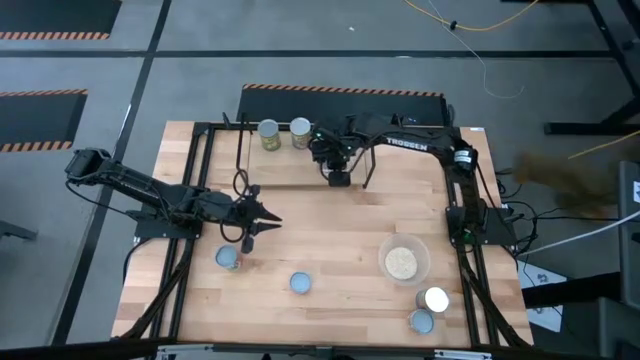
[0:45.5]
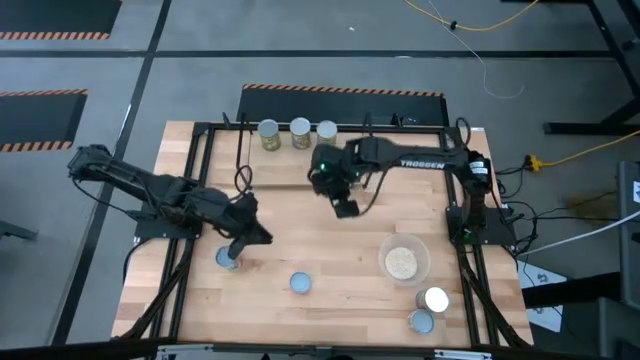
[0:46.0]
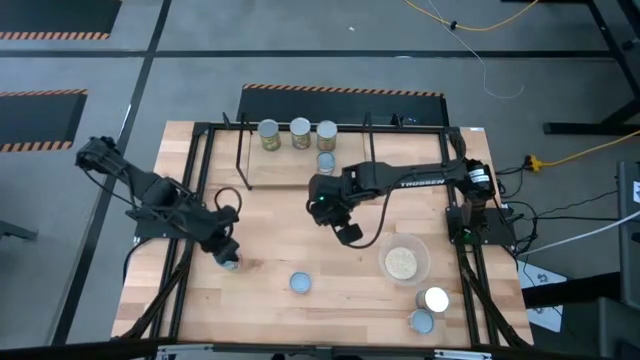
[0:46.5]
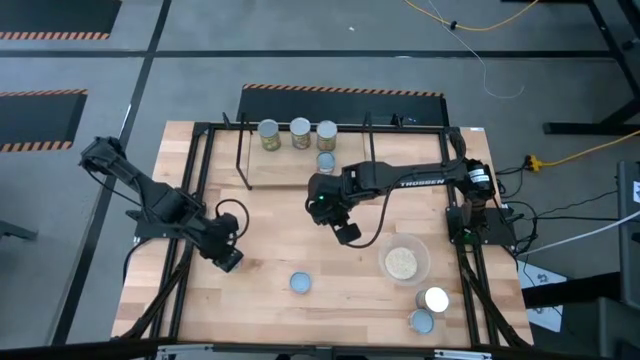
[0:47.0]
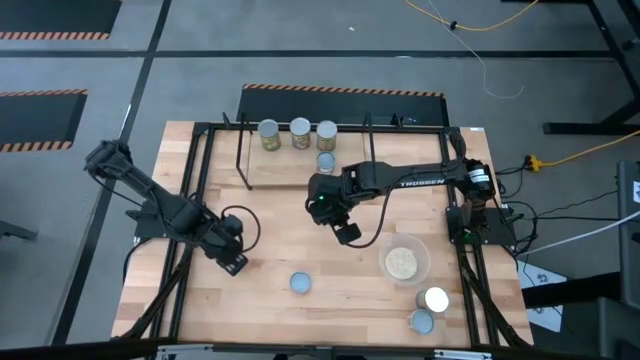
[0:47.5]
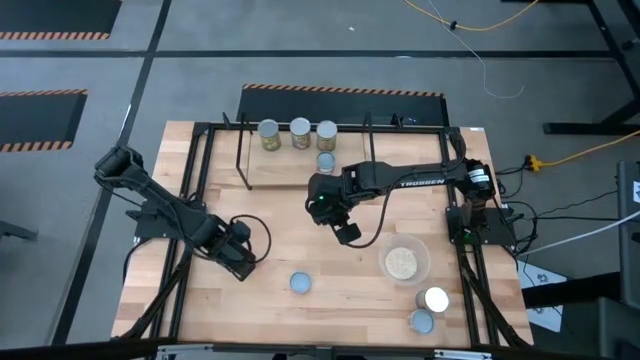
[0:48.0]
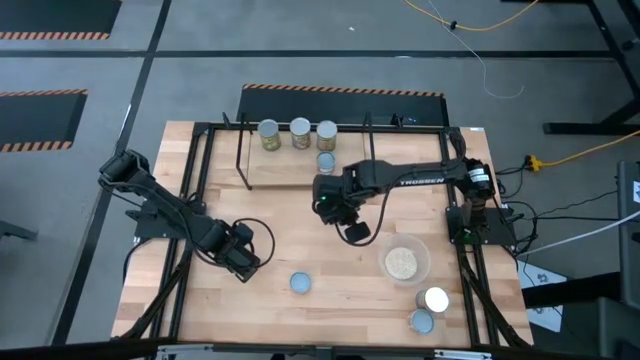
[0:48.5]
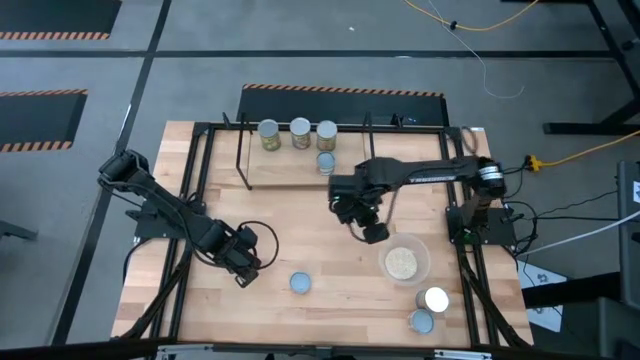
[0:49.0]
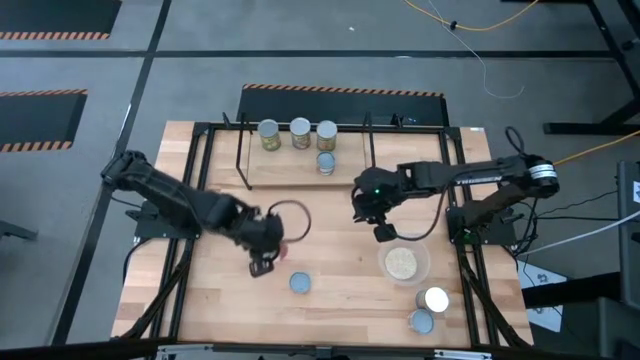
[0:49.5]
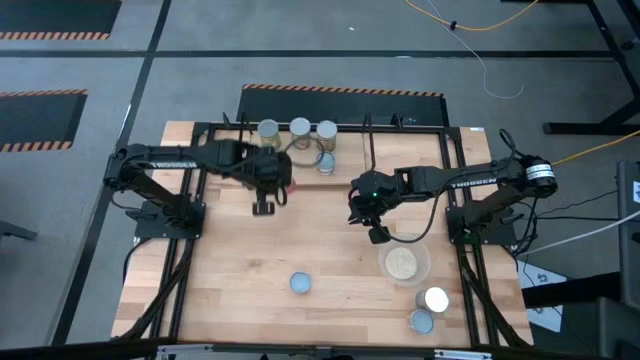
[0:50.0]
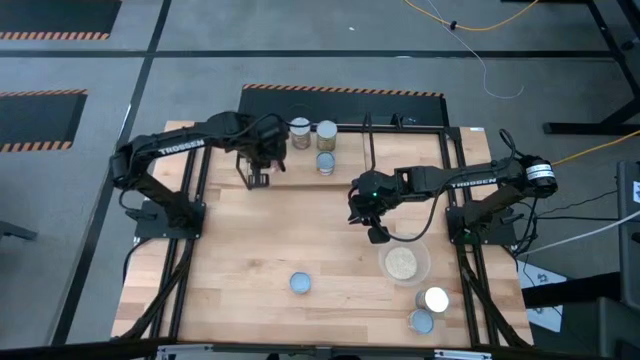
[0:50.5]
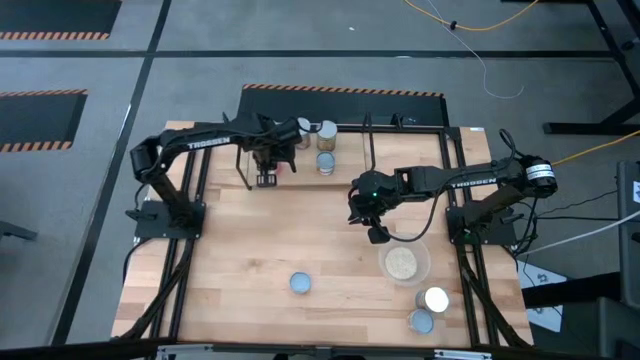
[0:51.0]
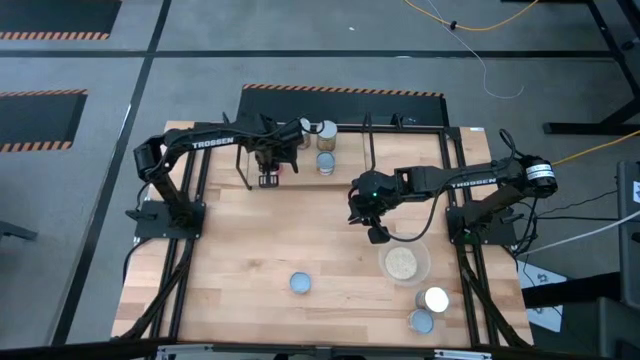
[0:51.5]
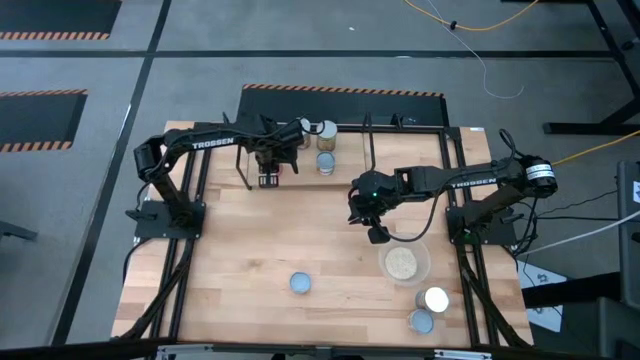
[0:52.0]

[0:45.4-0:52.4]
Task: Pick and place cans onto a shelf
Put the canned mixed fruit on the shelf

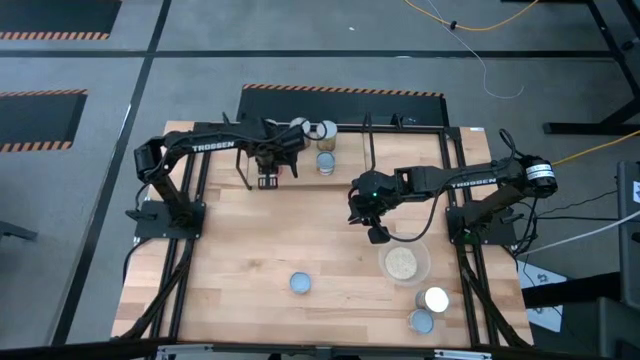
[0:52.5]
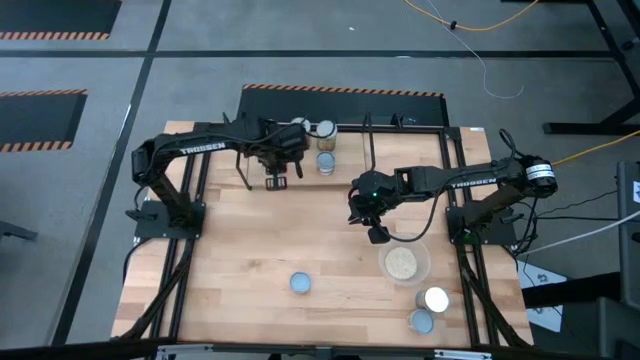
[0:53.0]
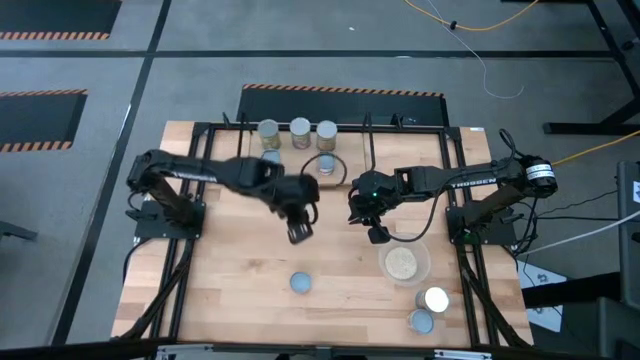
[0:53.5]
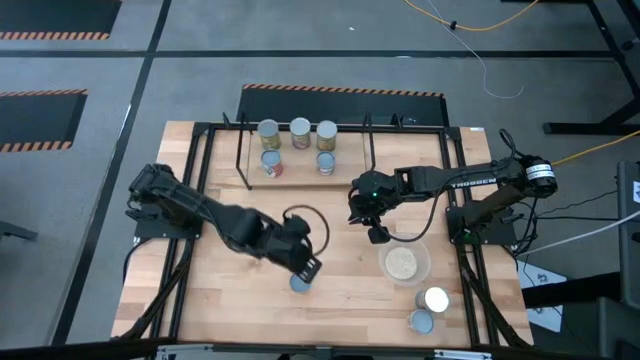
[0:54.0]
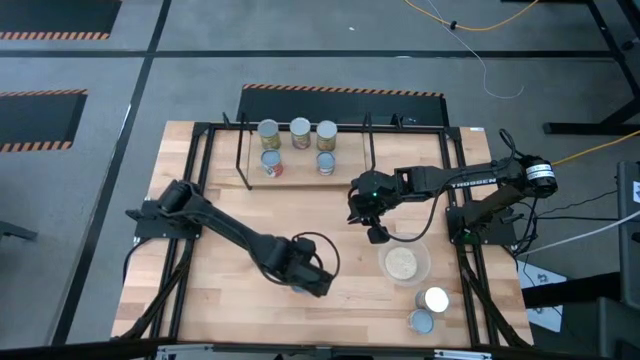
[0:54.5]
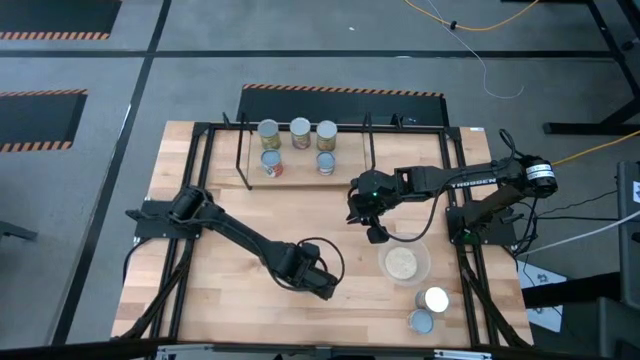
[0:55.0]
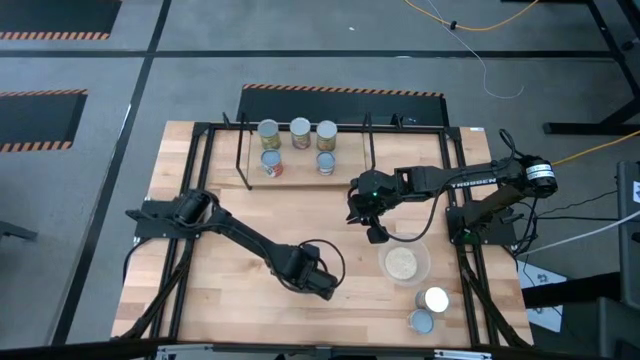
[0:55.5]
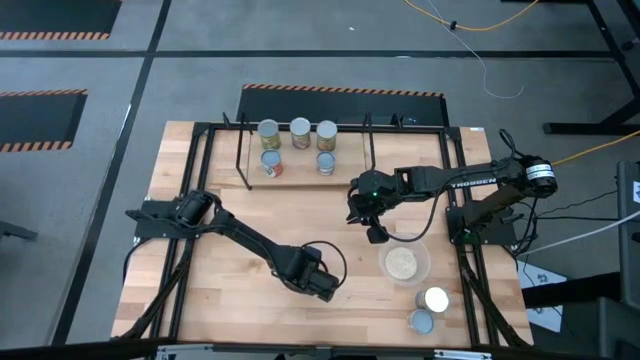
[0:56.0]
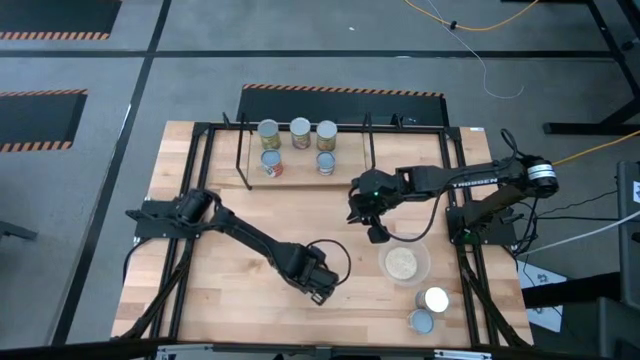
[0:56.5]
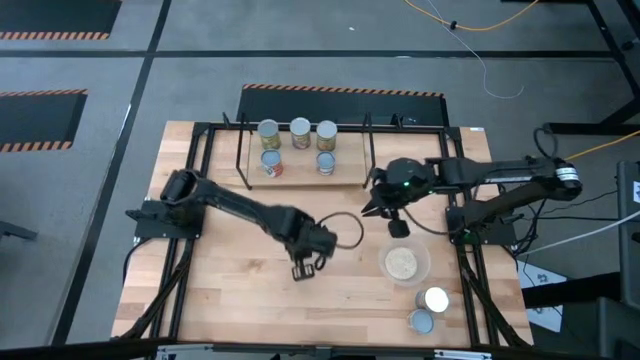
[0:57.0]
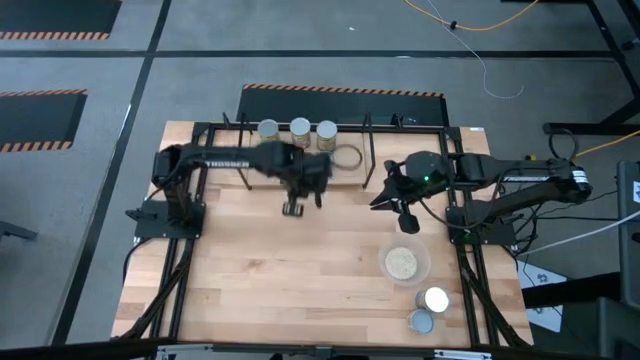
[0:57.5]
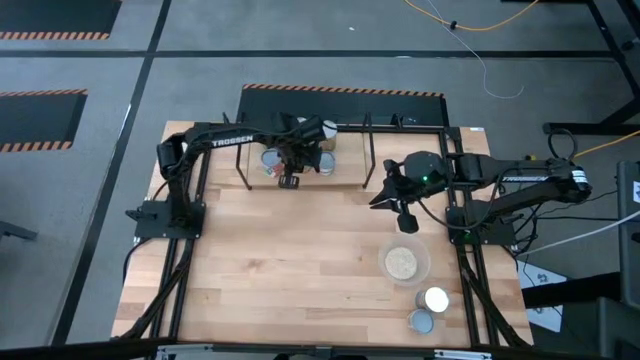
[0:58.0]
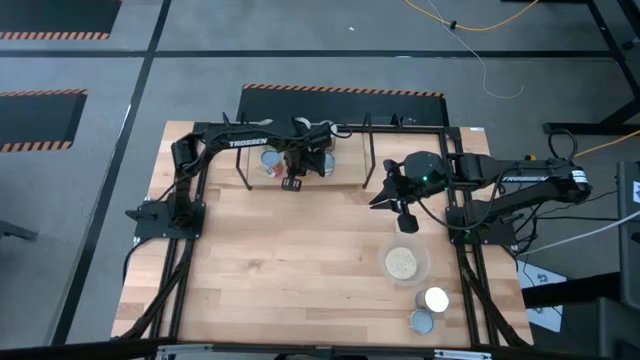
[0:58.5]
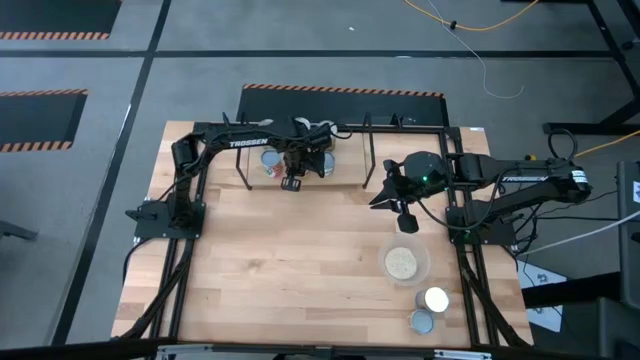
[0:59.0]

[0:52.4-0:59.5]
Put the canned pineapple rings on the shelf

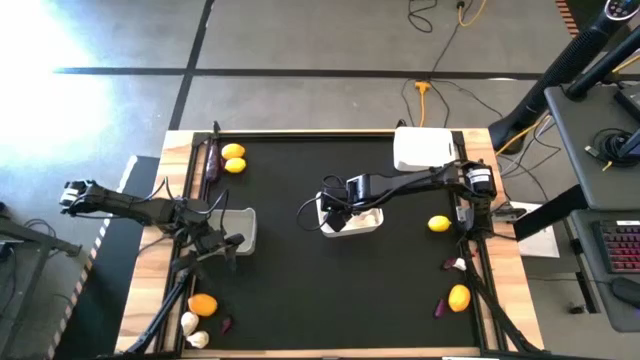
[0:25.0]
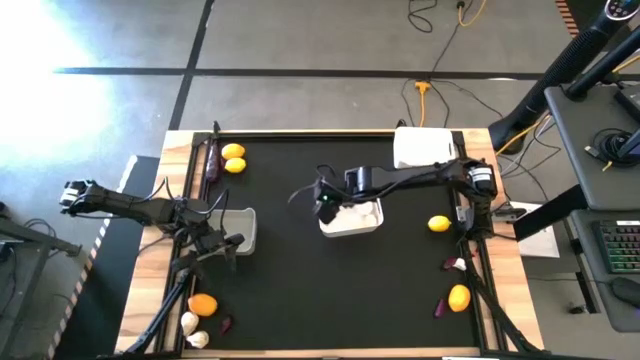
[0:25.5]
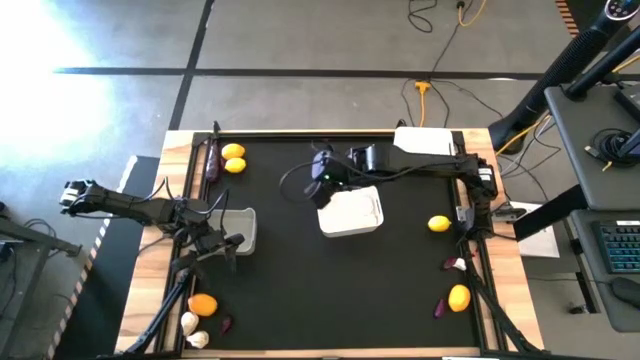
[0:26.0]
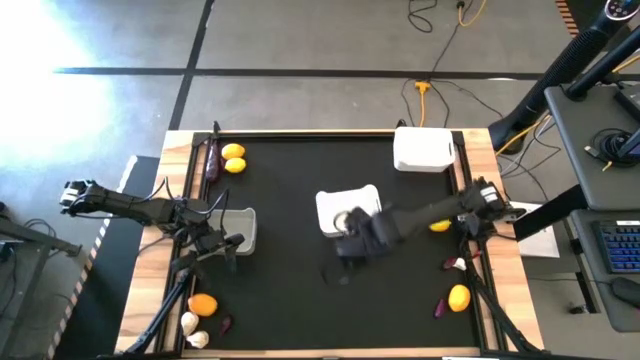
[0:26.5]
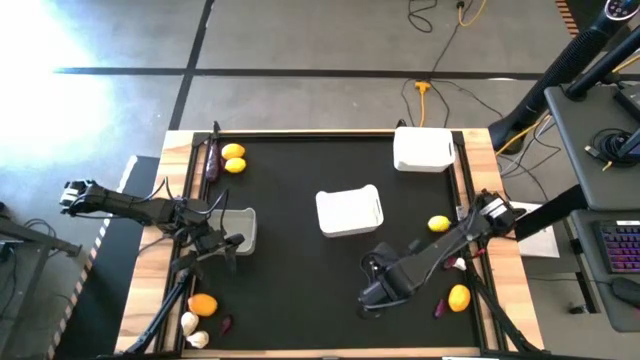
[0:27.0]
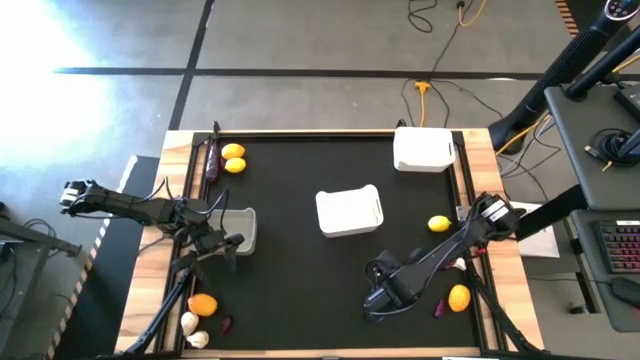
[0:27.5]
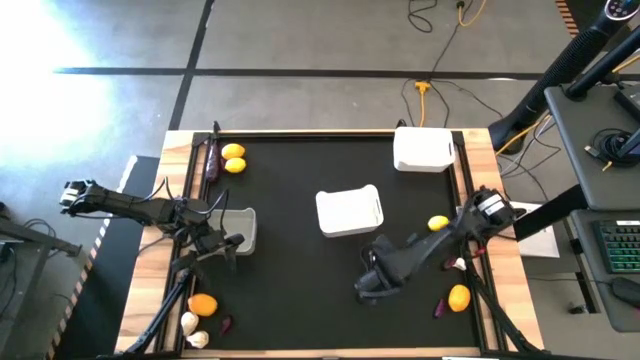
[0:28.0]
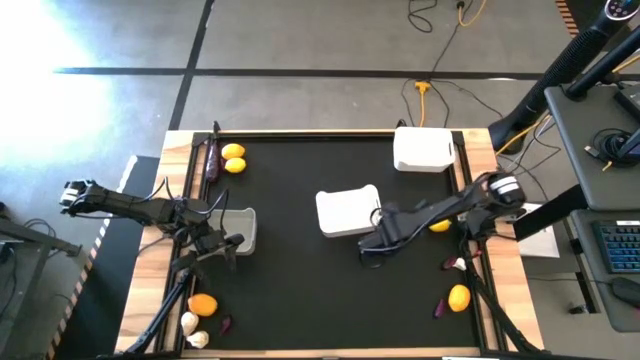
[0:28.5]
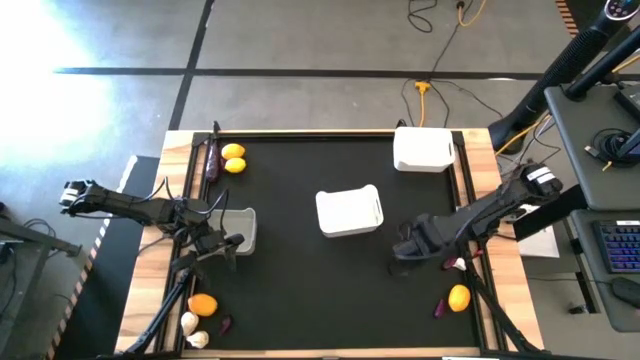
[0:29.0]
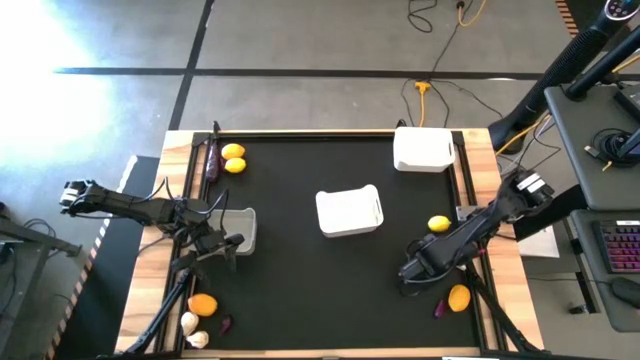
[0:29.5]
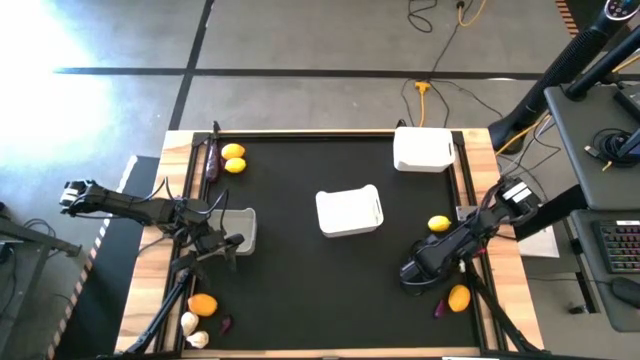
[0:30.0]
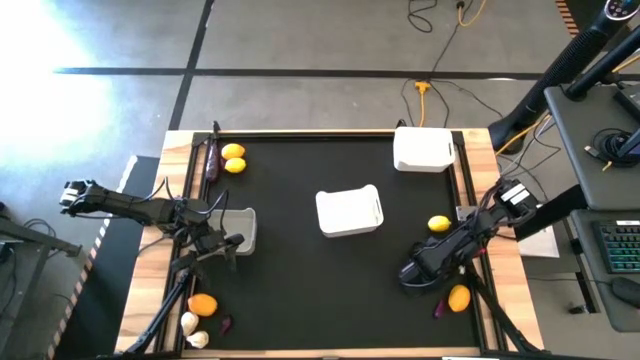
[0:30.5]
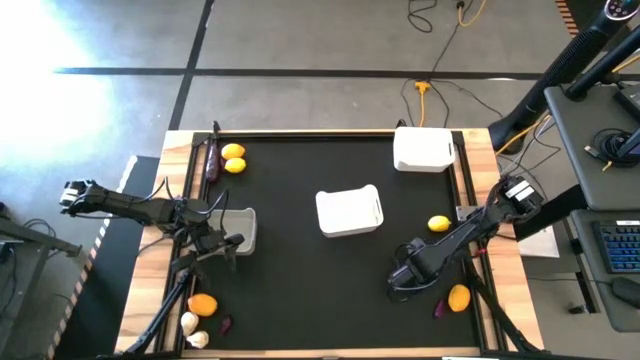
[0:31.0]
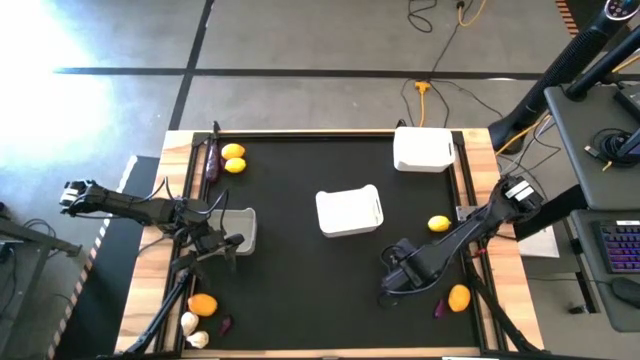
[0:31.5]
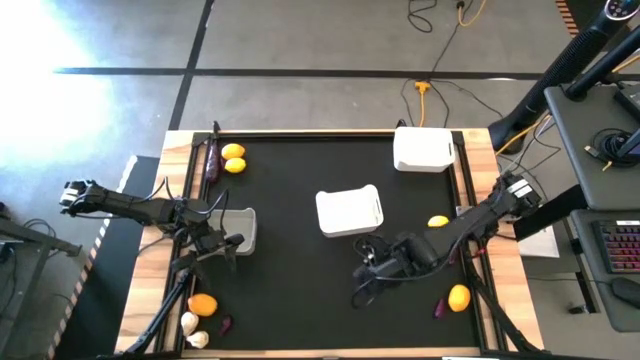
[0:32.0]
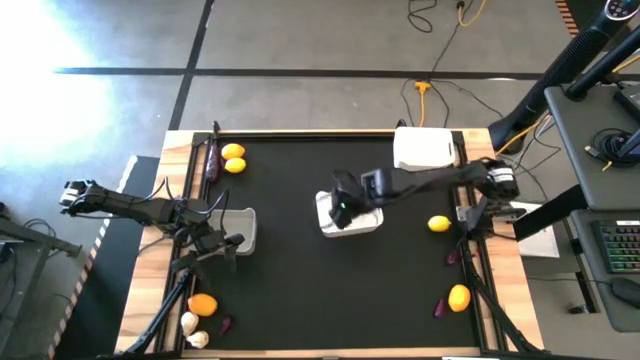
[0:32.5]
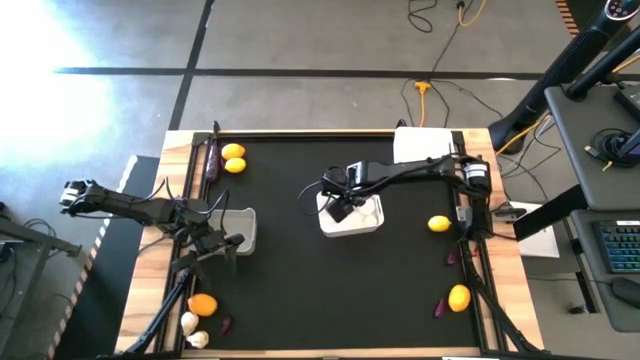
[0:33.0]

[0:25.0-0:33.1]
Task: Sort produce into baskets
Put the white garlic into the bottom white bin
